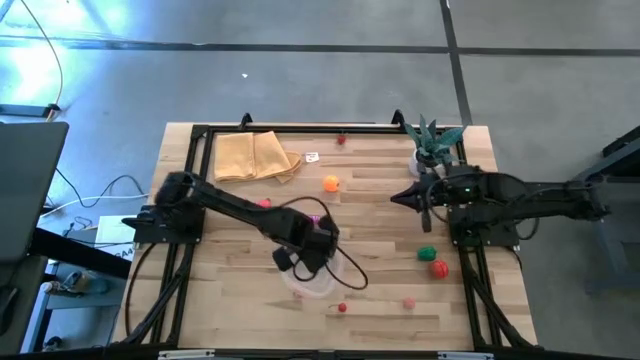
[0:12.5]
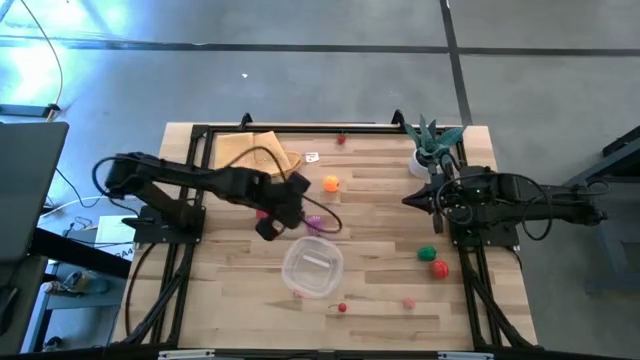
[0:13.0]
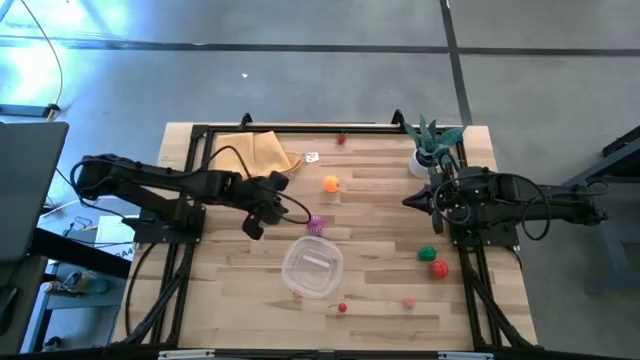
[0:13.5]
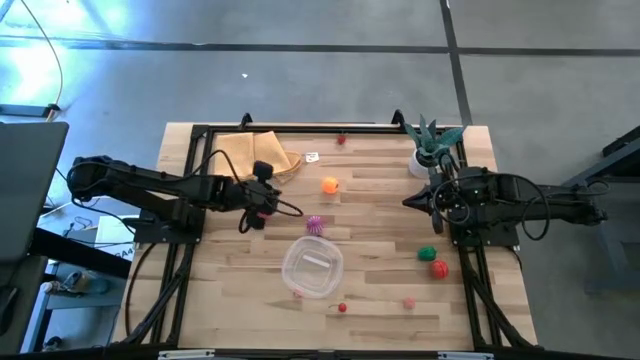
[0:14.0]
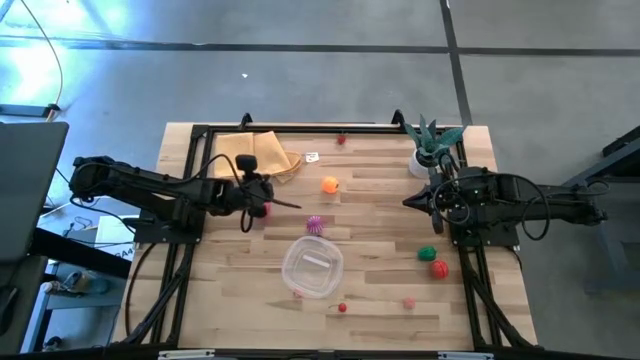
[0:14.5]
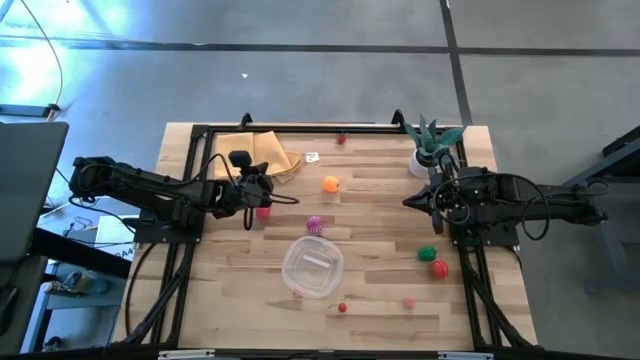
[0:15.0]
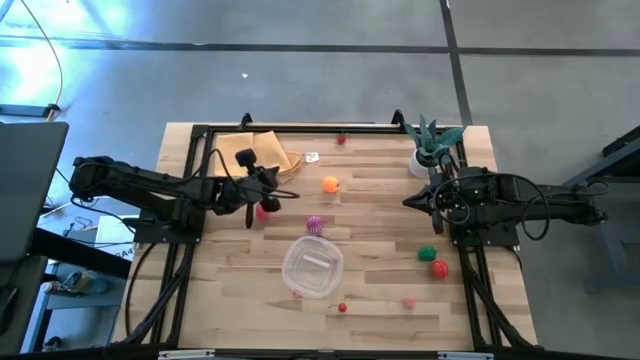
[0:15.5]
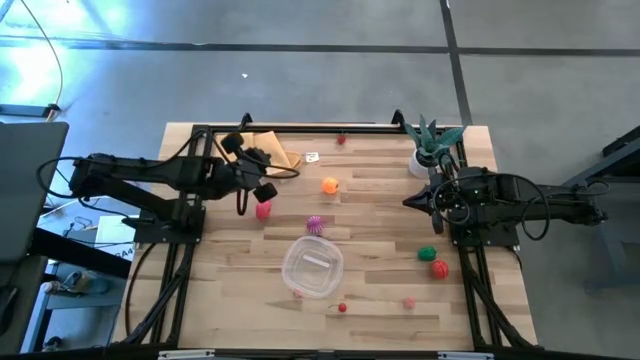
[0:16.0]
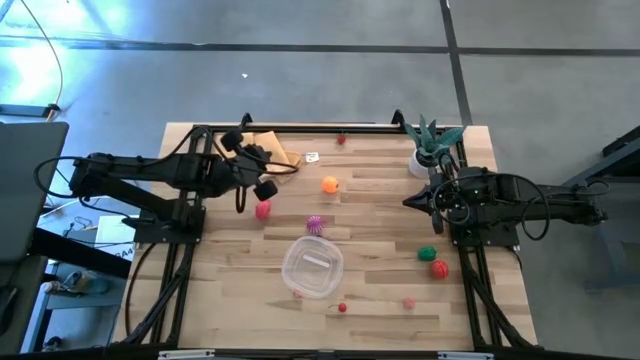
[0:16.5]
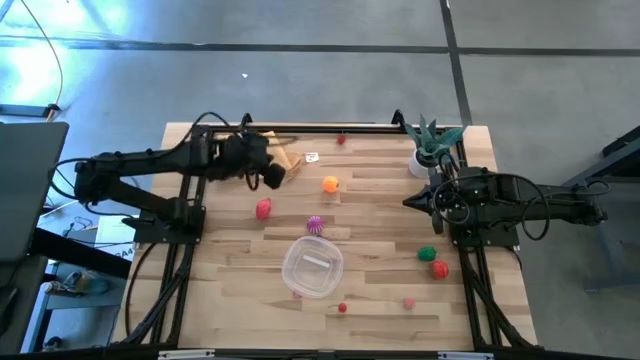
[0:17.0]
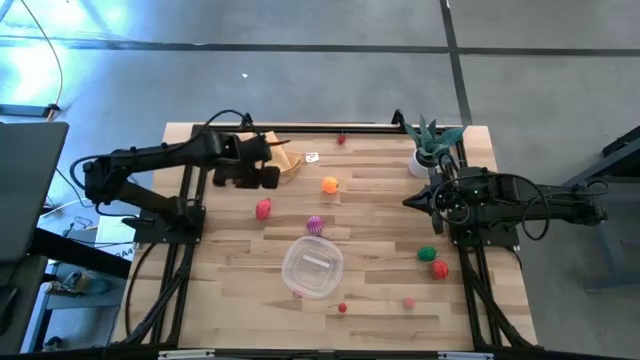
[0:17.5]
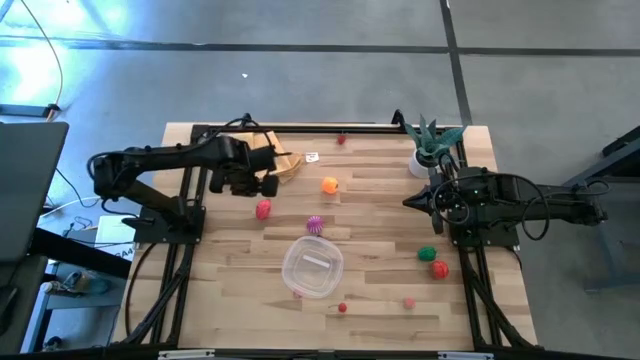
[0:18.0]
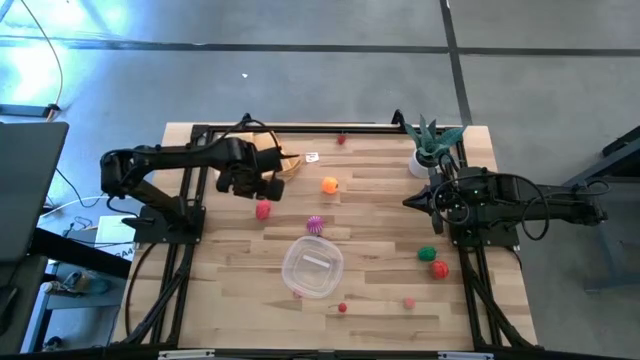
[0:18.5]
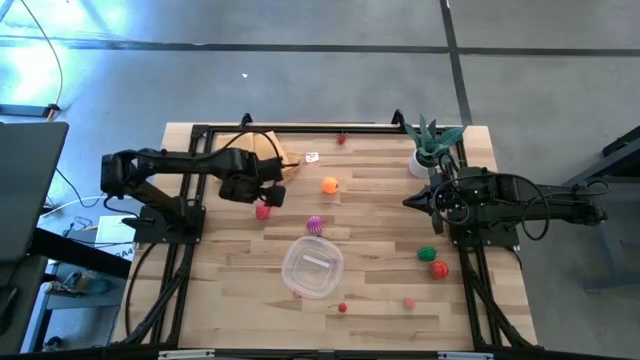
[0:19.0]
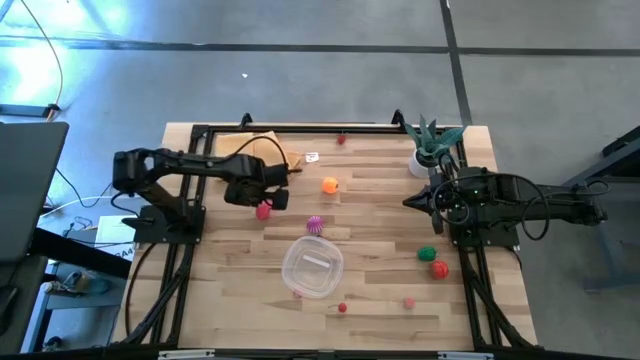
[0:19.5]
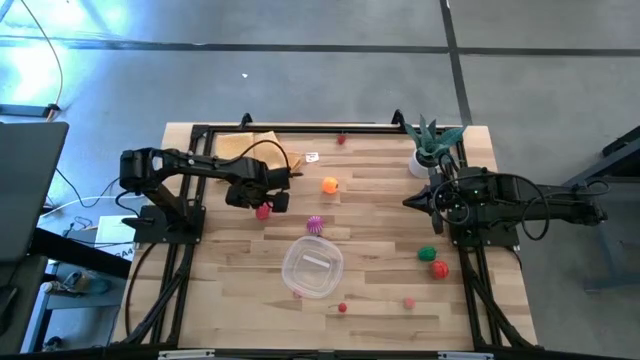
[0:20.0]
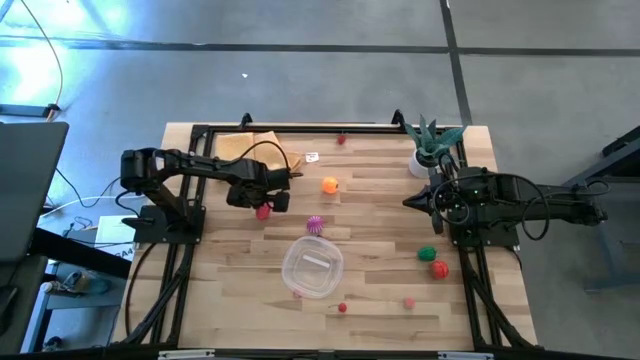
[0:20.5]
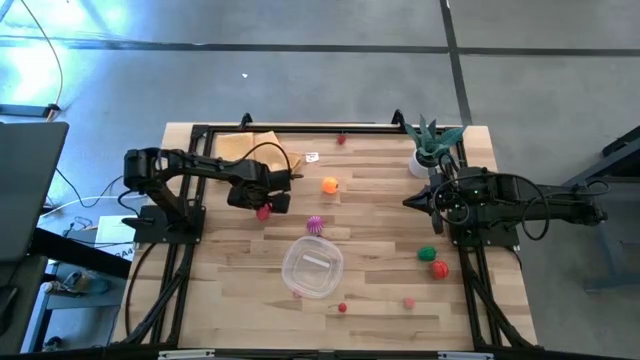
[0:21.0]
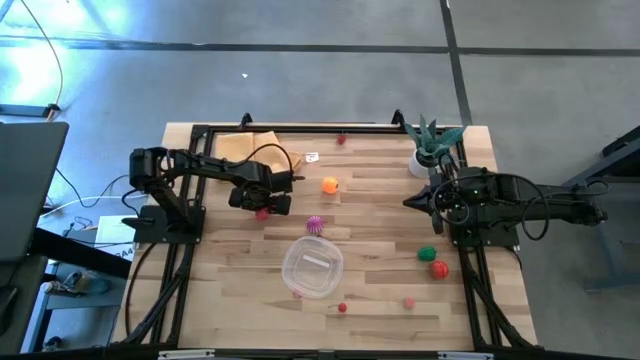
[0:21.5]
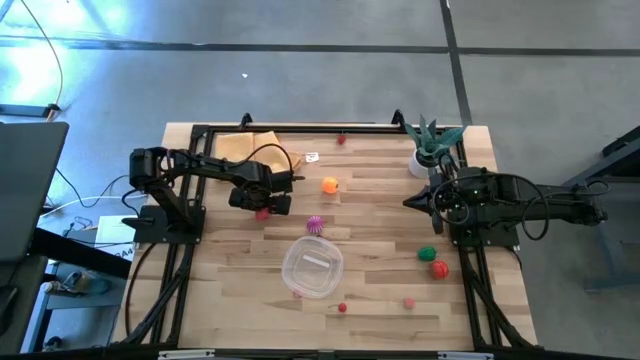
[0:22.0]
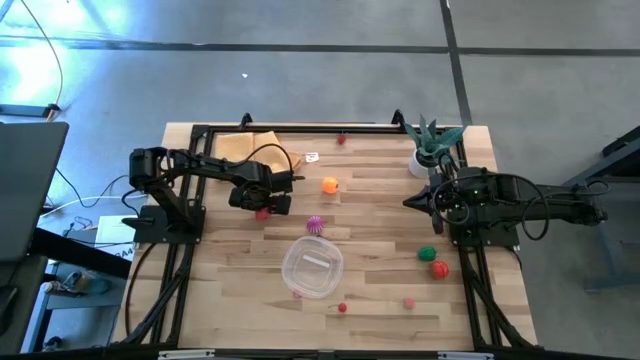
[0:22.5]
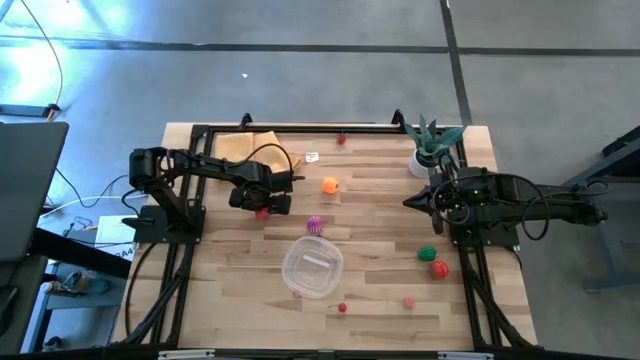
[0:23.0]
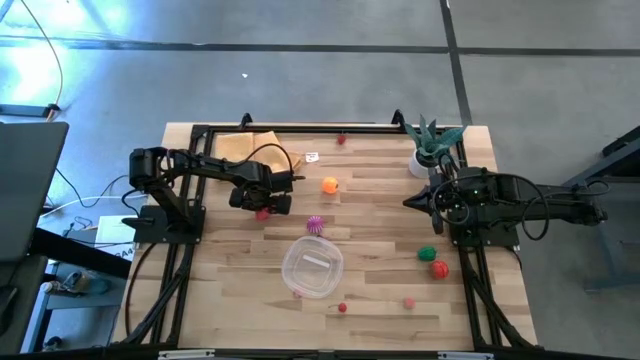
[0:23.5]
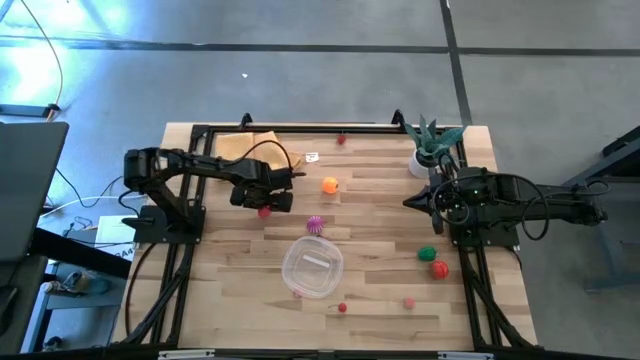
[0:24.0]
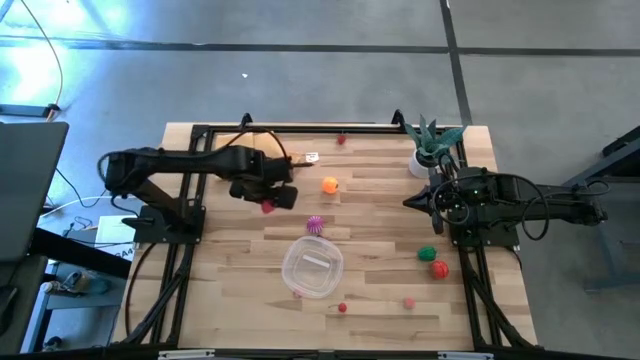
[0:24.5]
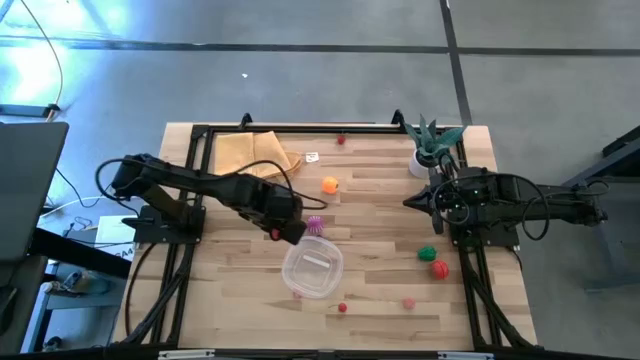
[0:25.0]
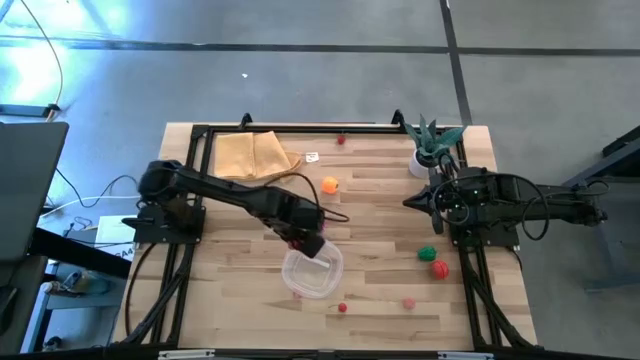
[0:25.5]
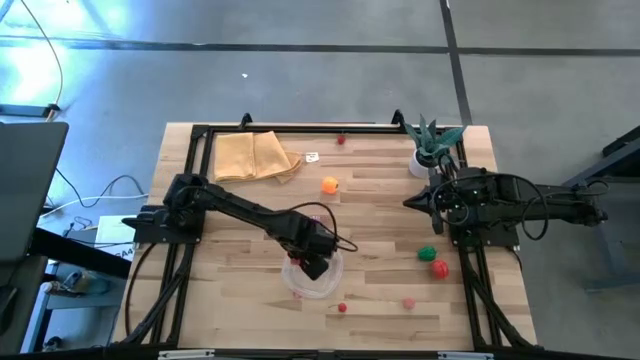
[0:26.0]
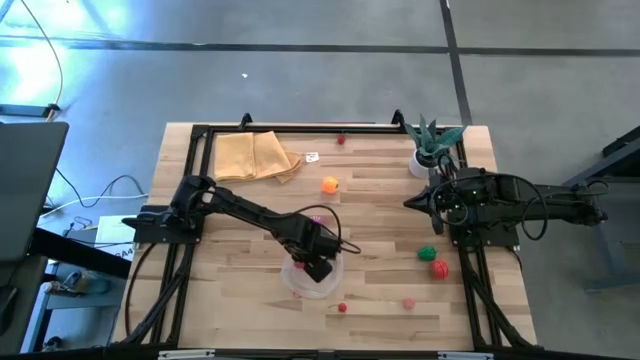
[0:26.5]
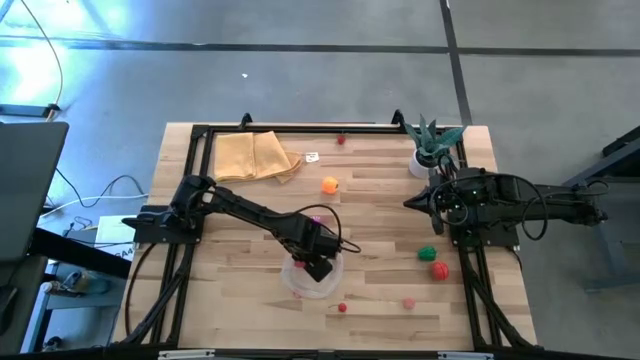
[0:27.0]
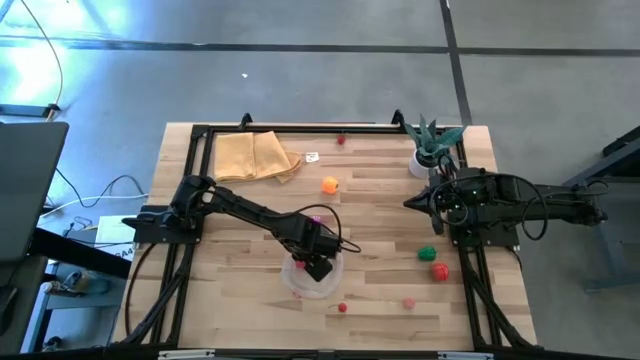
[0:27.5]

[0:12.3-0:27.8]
Task: Pick and placing Produce into tupperware
Put the dragon fruit into the bin

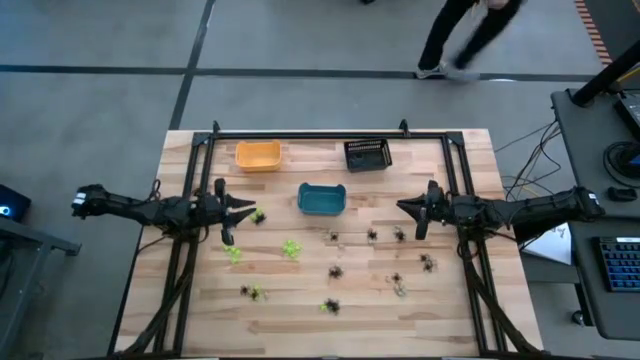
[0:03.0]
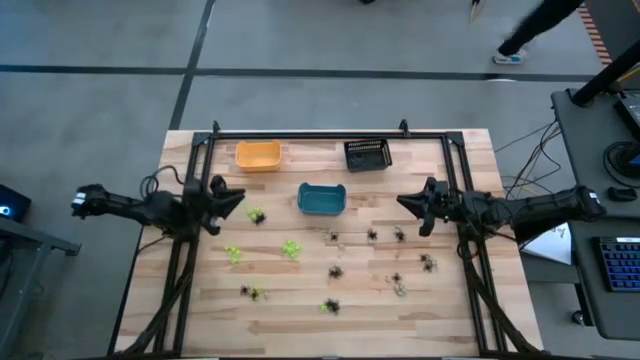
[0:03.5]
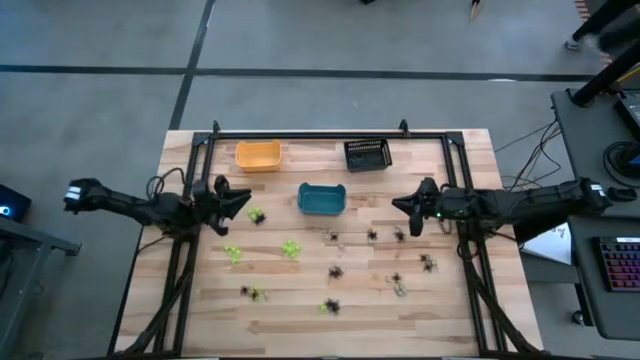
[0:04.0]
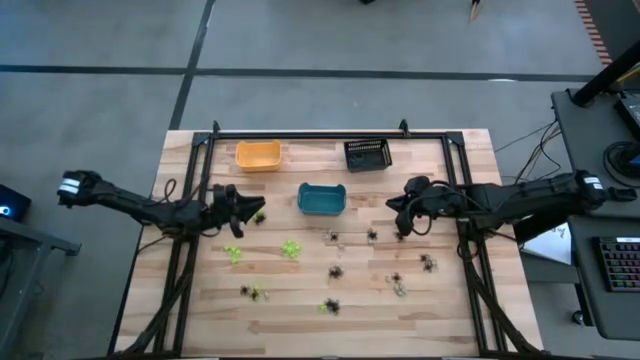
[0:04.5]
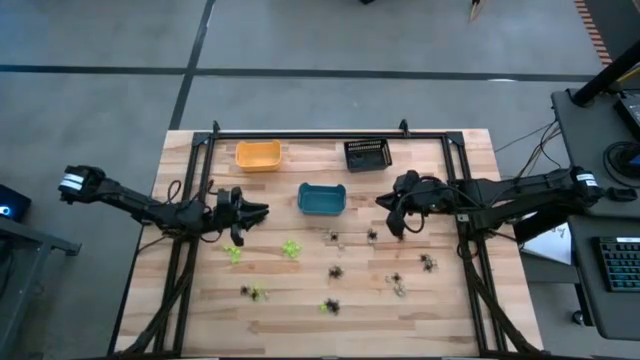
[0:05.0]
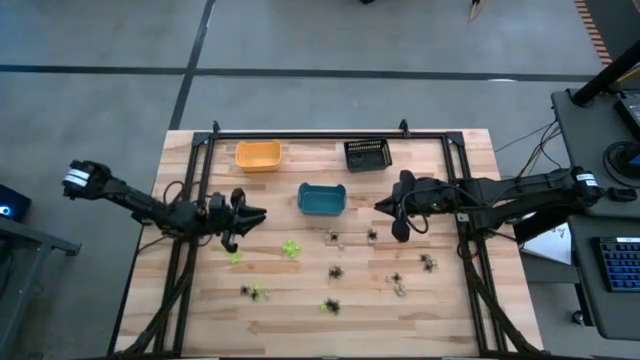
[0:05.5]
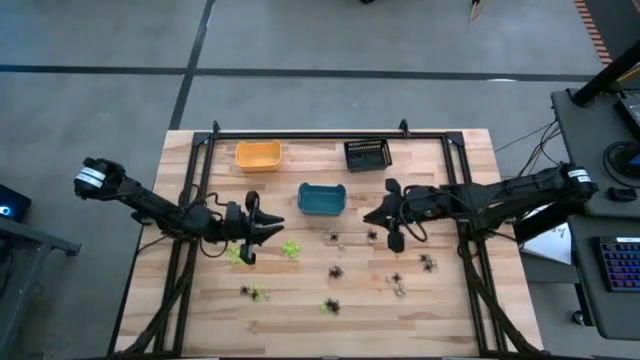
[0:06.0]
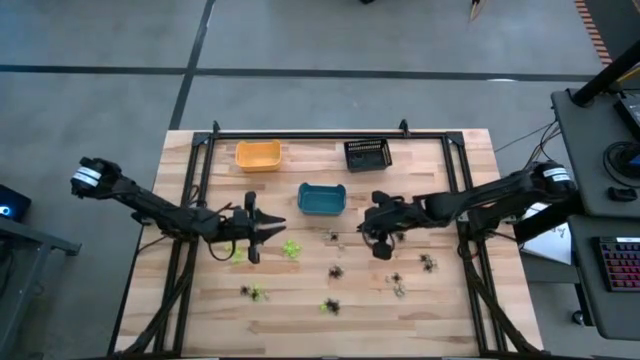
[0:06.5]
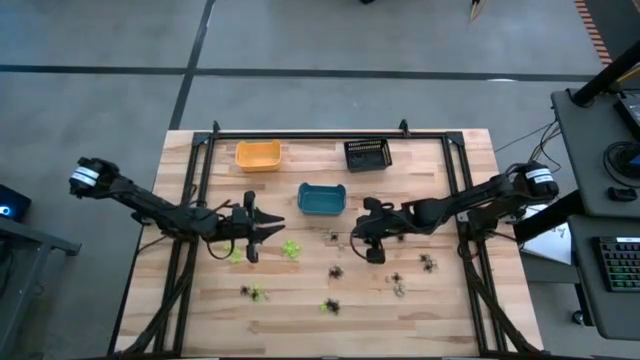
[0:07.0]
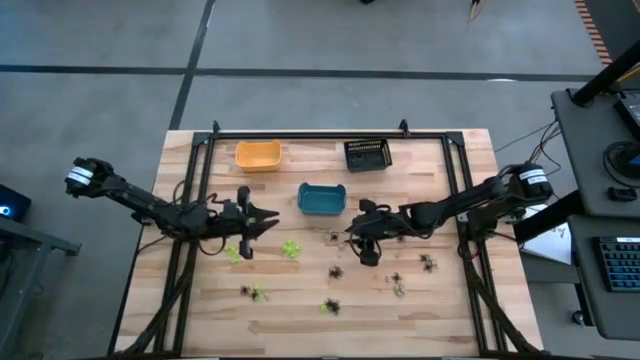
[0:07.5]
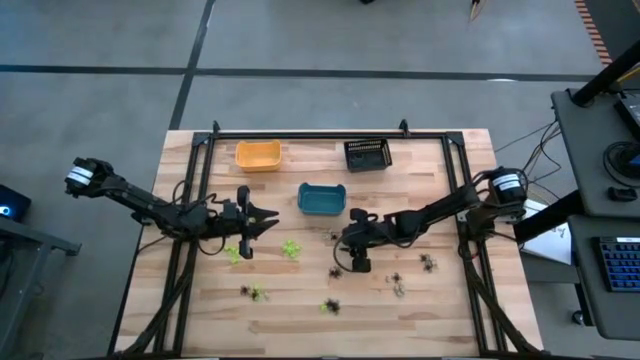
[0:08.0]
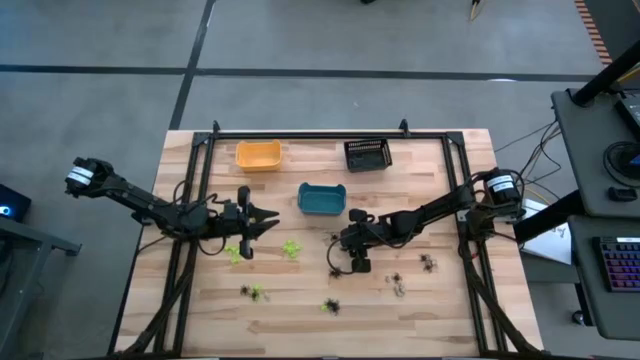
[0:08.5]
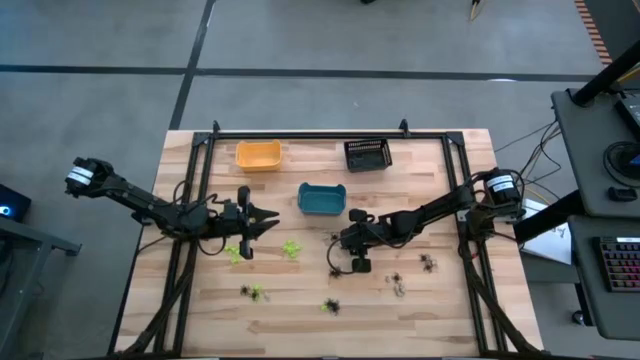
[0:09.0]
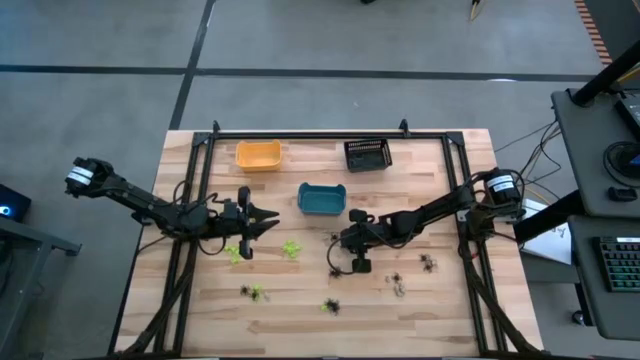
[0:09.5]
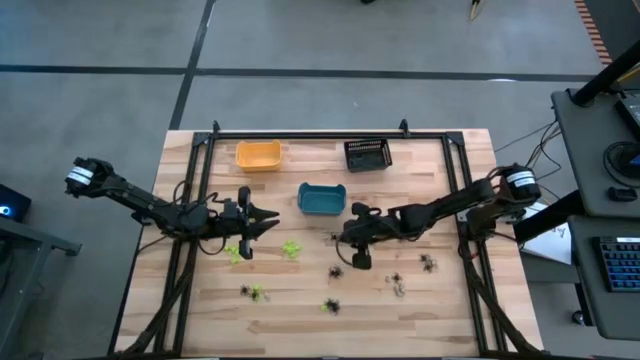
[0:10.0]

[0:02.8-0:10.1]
Task: Sort Halloween decoration
Put the white skull toy into the black bin
